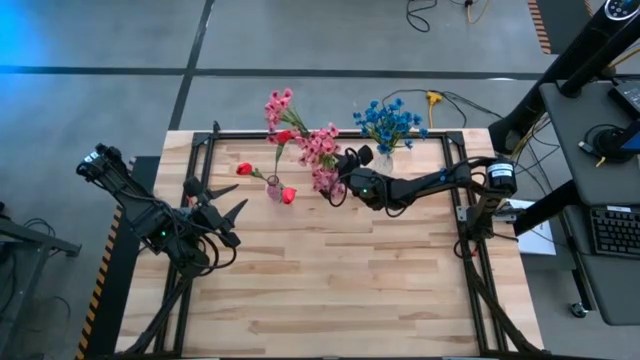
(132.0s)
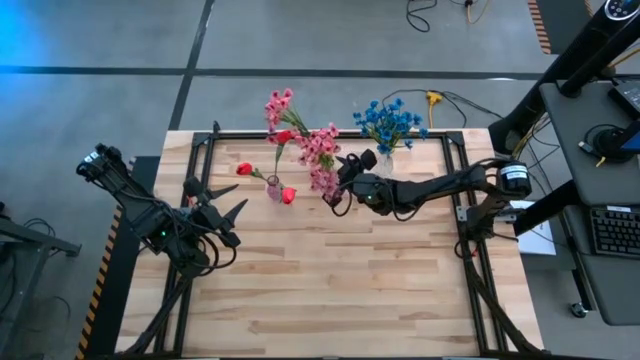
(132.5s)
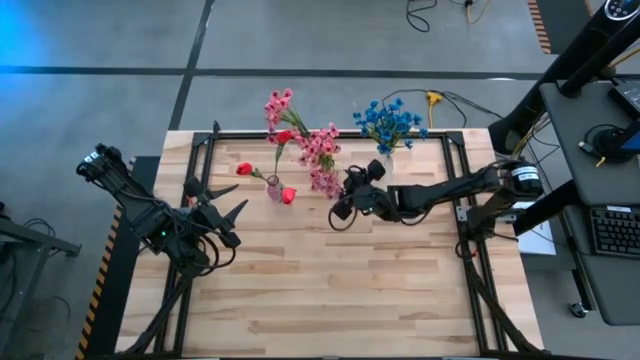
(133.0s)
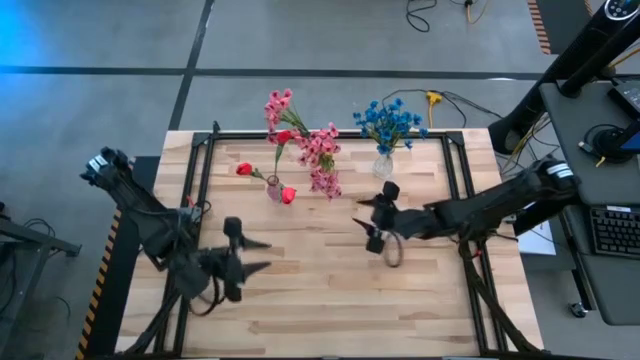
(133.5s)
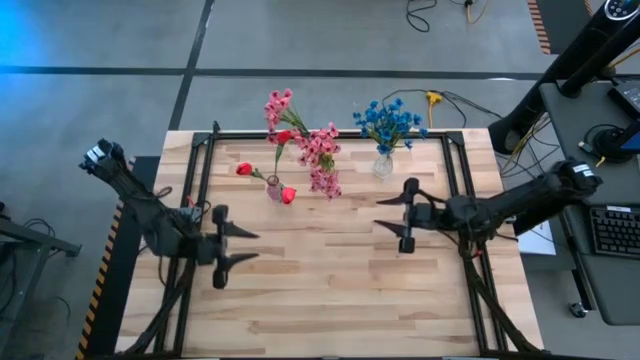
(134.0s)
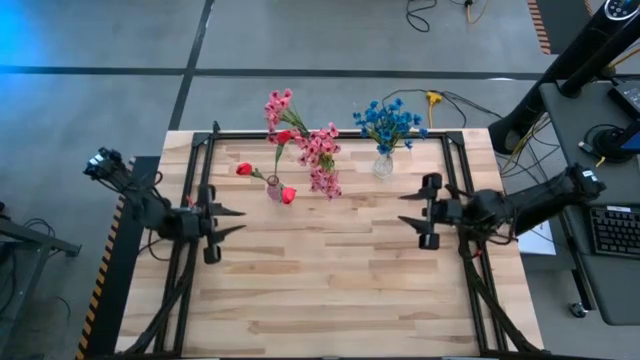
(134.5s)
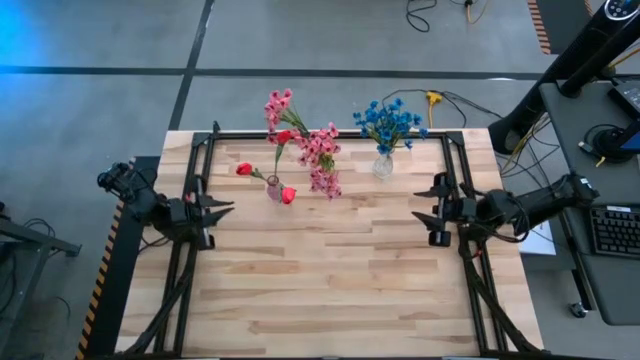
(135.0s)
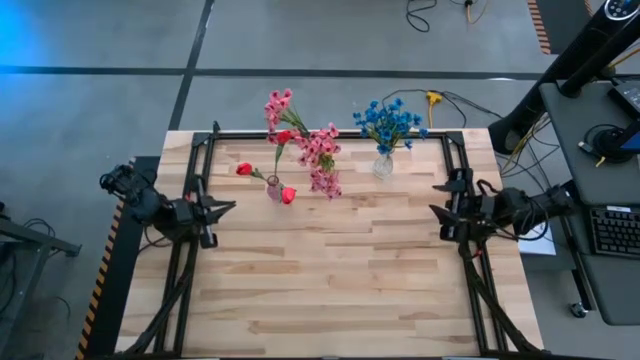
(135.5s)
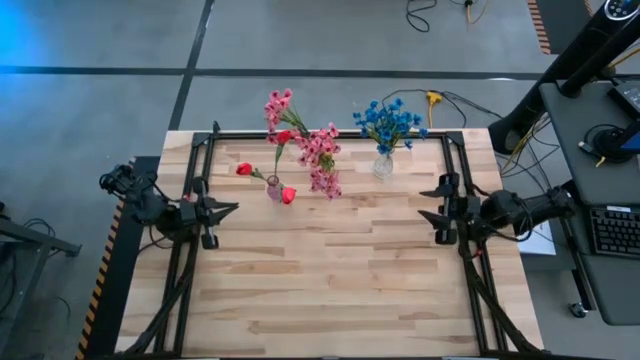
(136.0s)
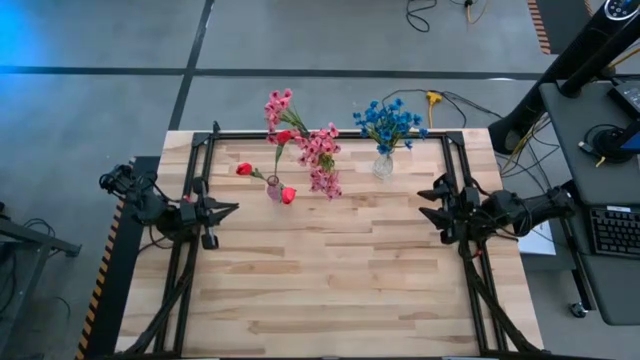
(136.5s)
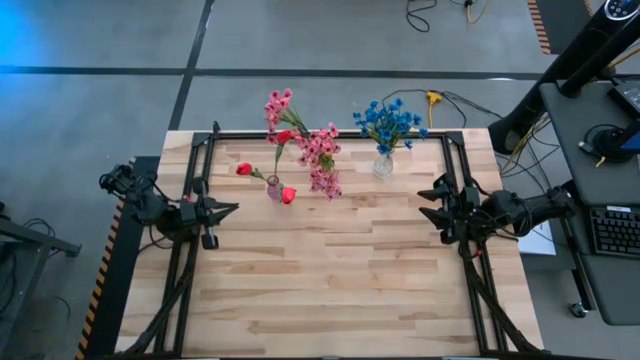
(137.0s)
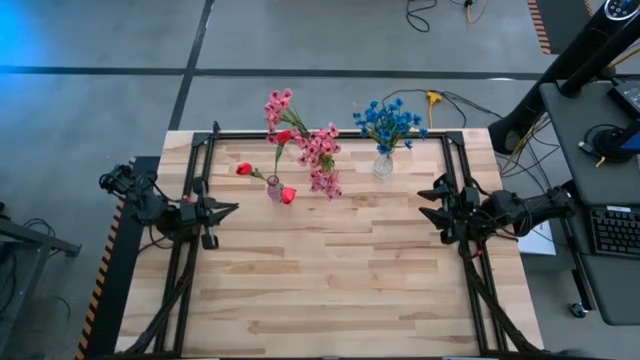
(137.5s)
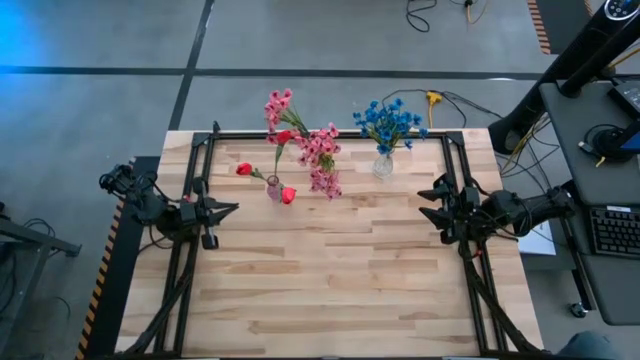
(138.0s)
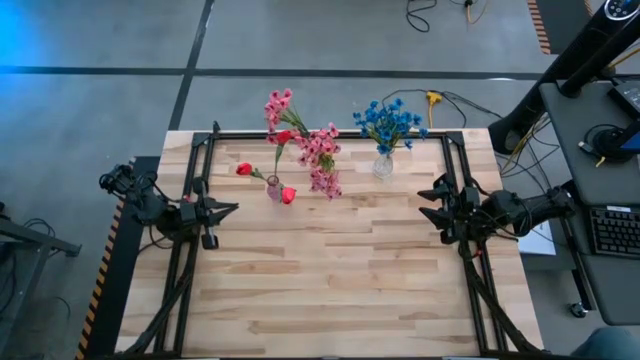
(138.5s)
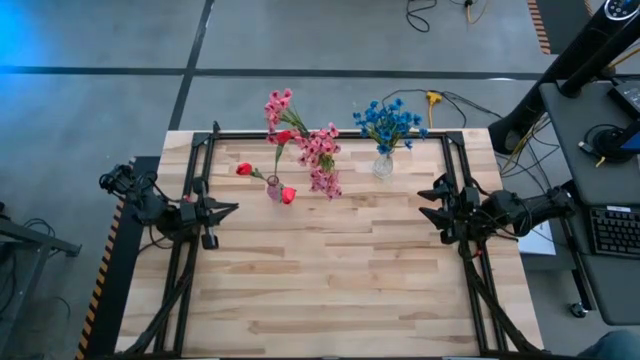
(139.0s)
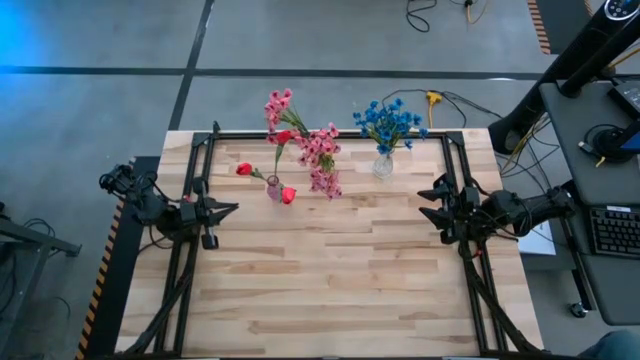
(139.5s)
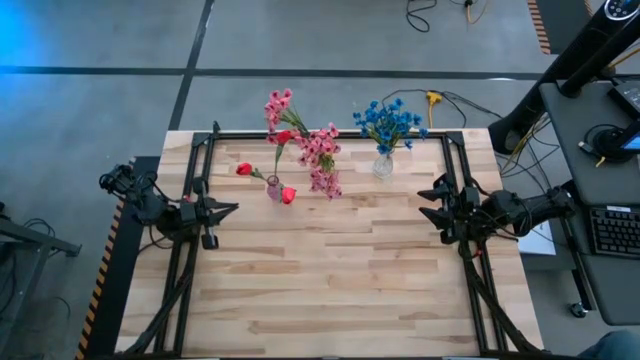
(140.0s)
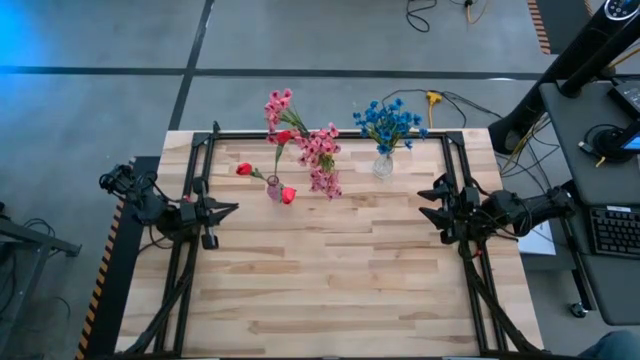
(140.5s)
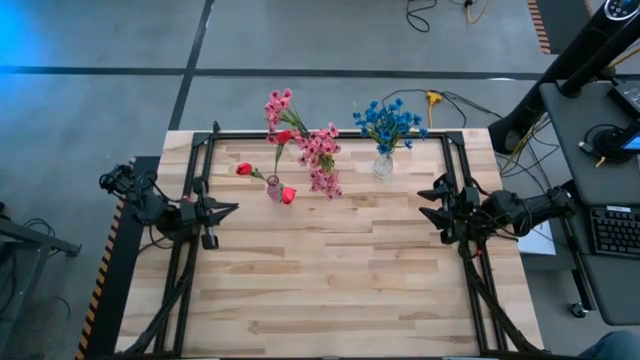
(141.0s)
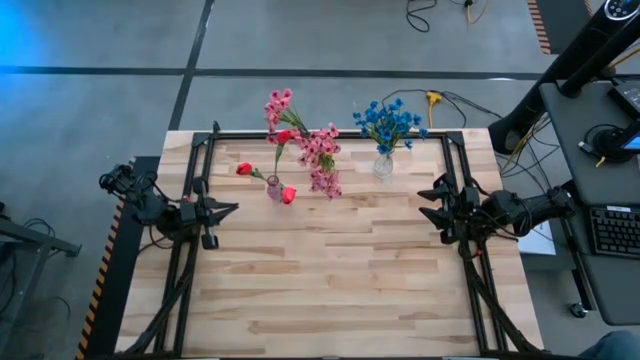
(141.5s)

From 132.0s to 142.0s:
Task: Sort flowers into vase by color
Return to Home Position

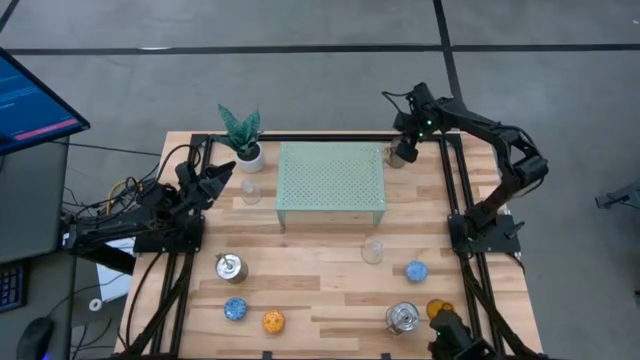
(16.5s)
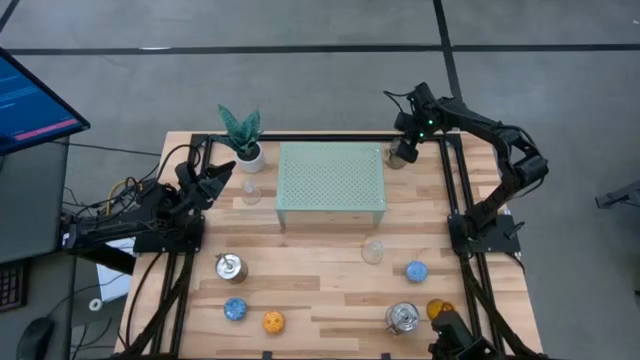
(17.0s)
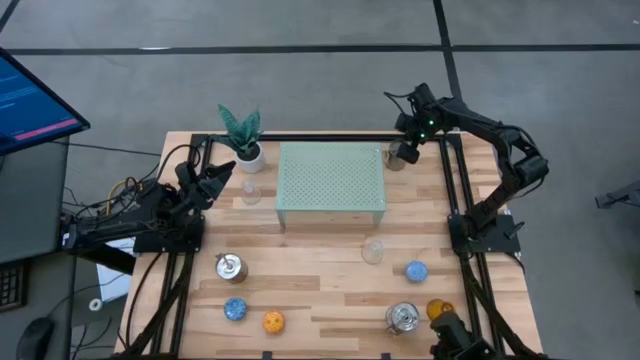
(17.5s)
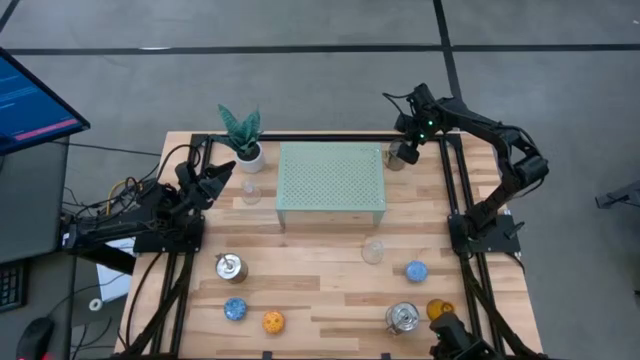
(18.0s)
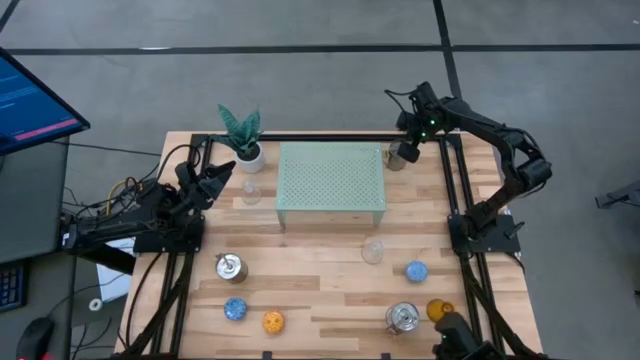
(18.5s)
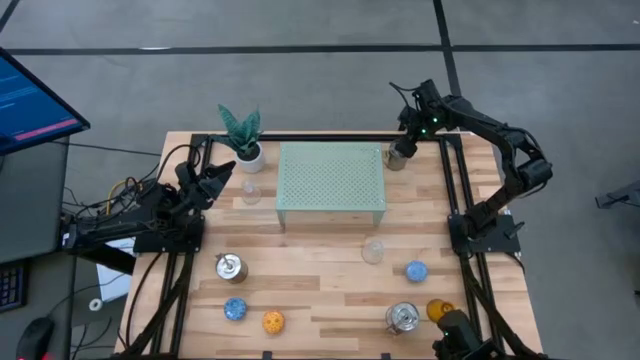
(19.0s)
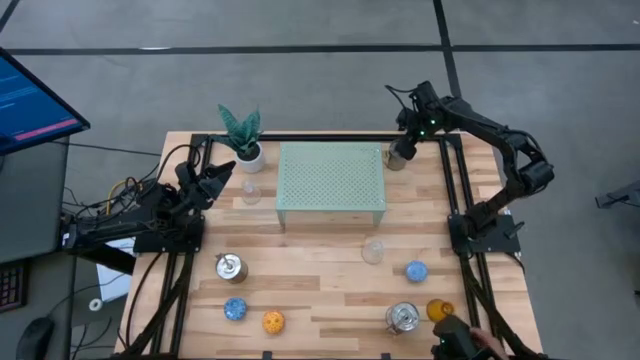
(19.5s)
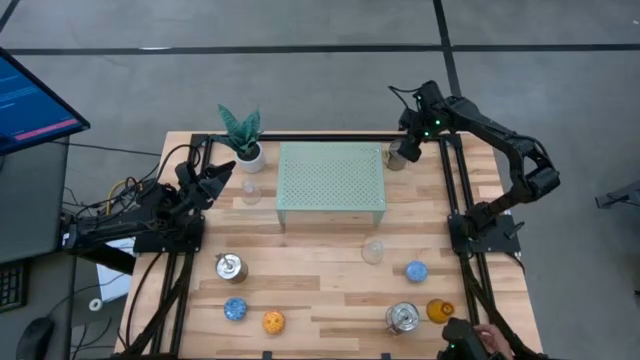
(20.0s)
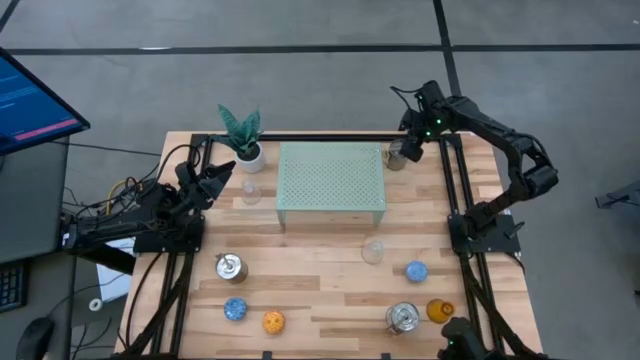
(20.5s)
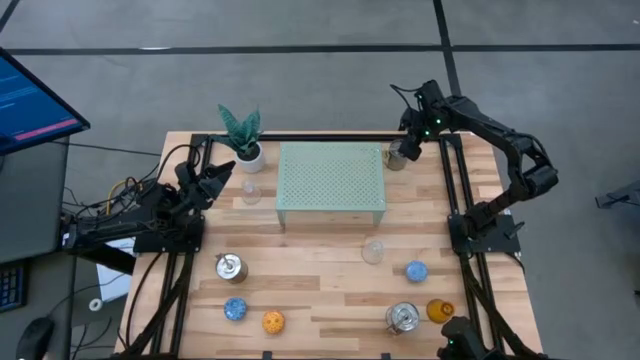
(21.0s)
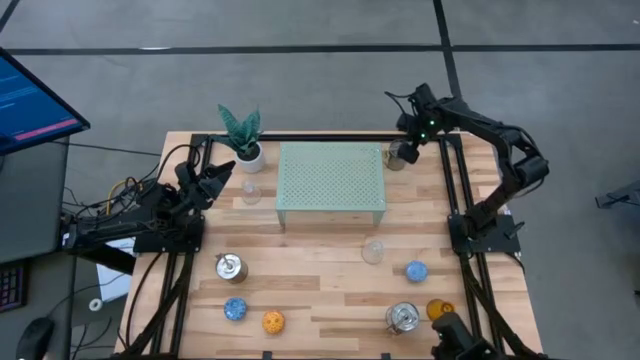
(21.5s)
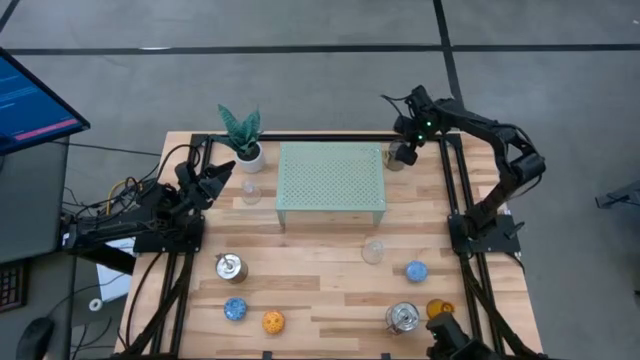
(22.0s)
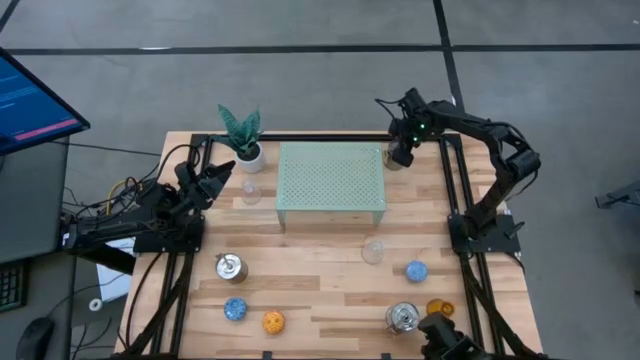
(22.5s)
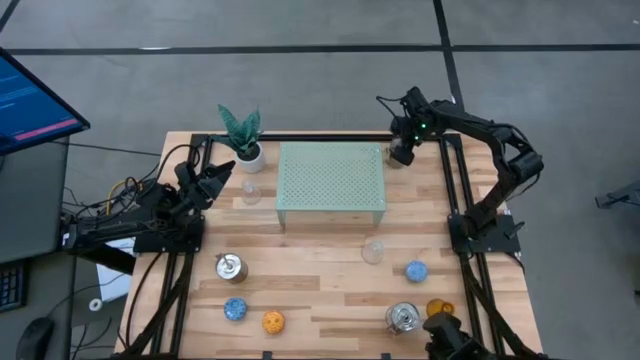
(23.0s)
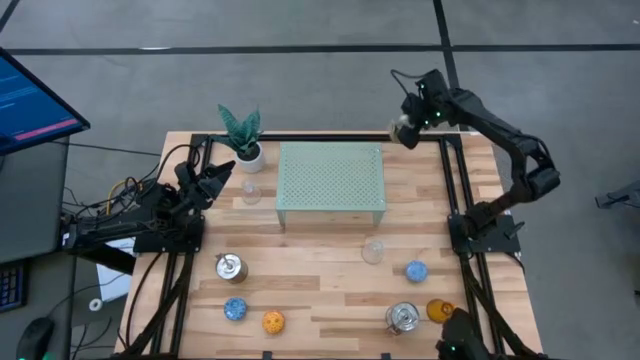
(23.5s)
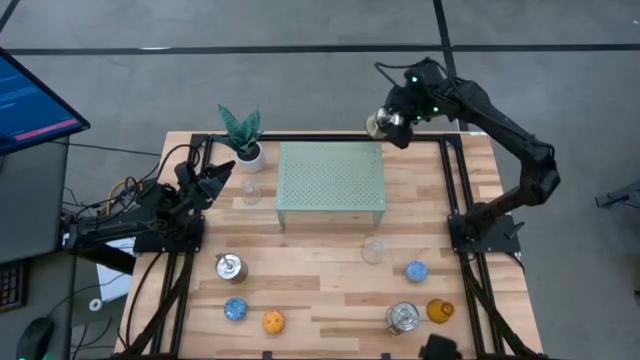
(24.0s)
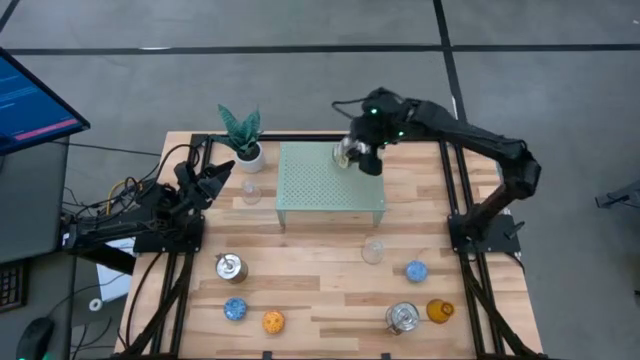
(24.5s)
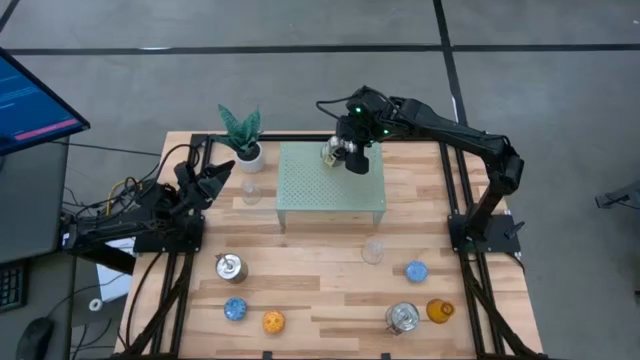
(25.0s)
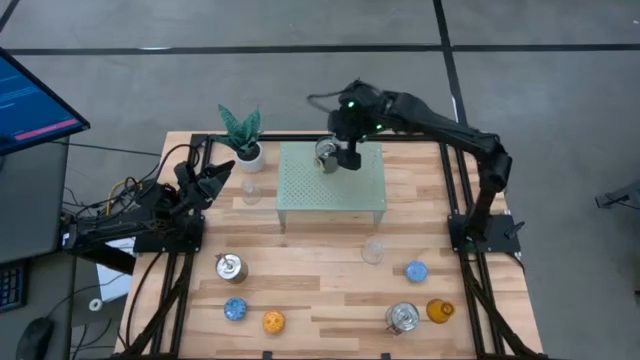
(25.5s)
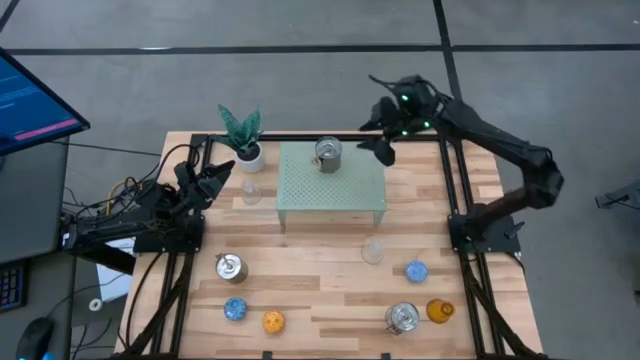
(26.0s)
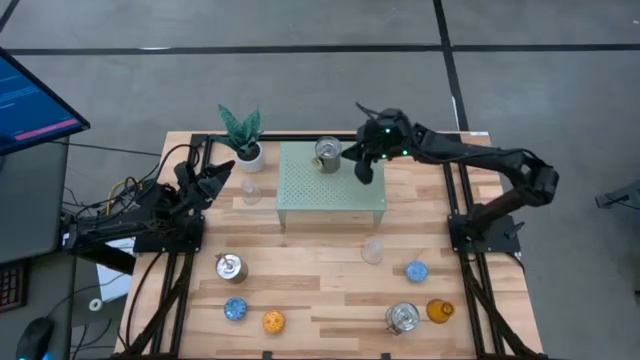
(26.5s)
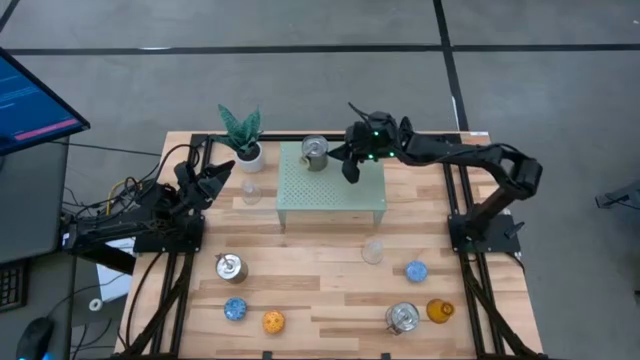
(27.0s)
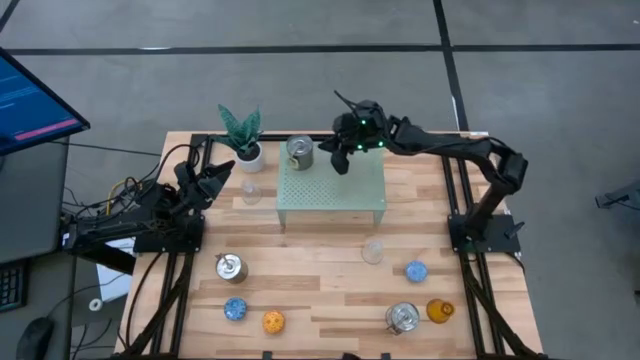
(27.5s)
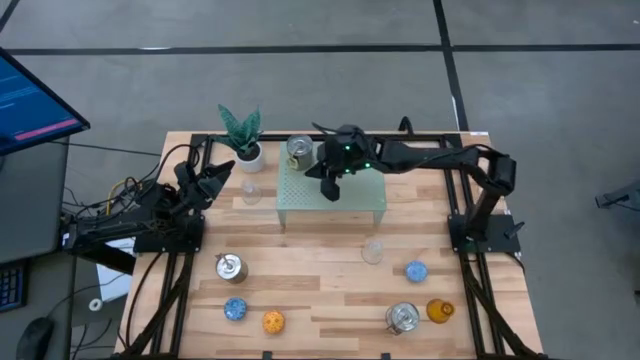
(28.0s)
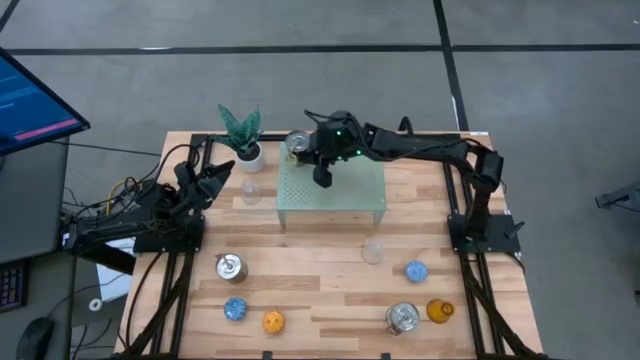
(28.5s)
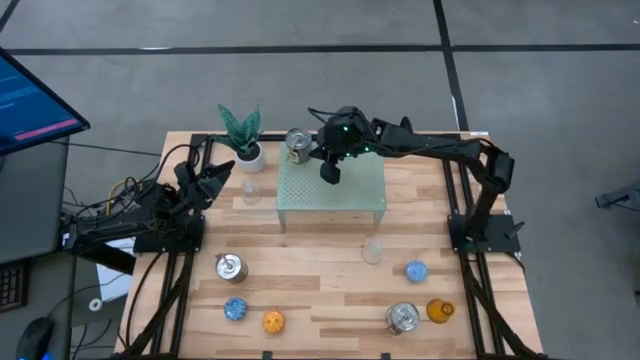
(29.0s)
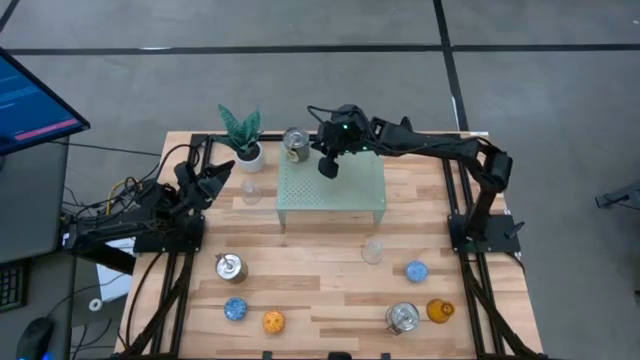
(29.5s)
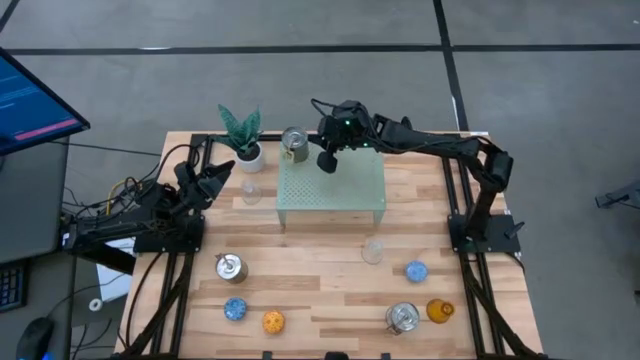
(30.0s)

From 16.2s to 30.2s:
Task: Pick & Place candle stick holders
Put the top silver scented candle on the shelf
